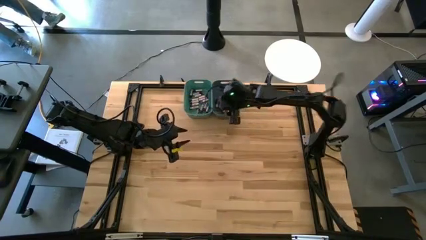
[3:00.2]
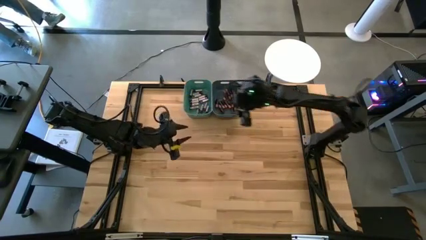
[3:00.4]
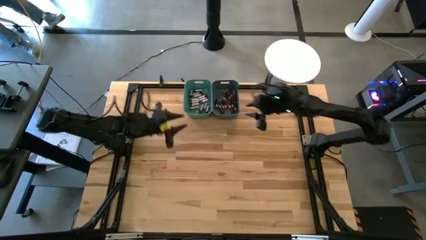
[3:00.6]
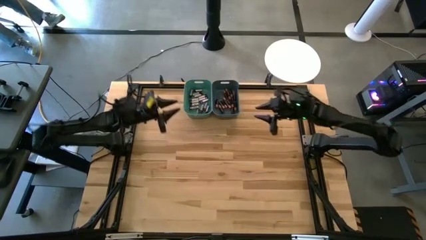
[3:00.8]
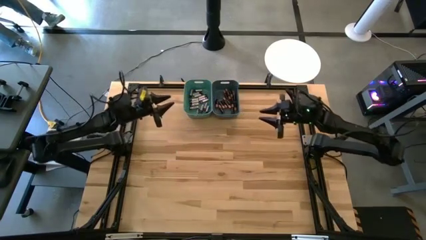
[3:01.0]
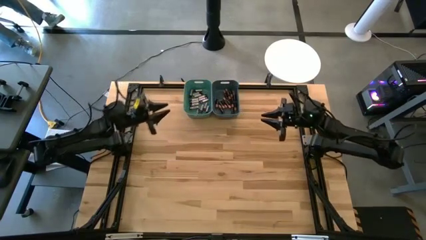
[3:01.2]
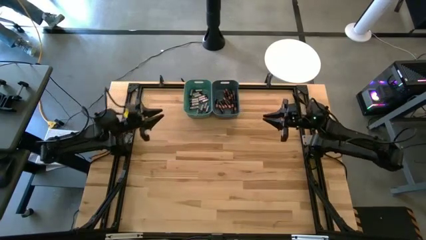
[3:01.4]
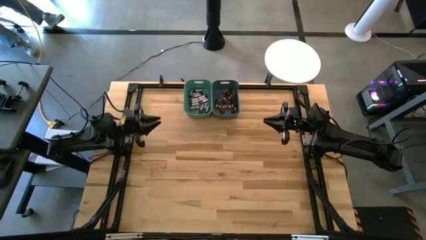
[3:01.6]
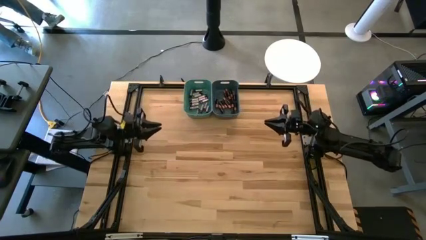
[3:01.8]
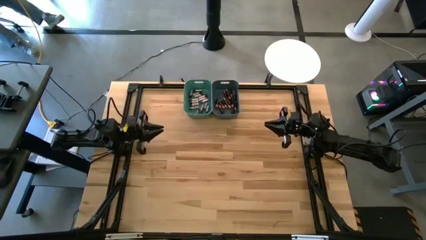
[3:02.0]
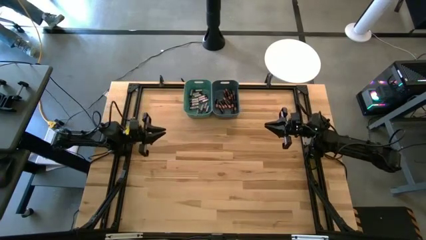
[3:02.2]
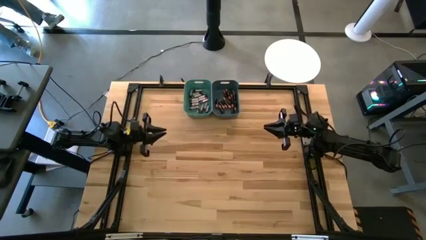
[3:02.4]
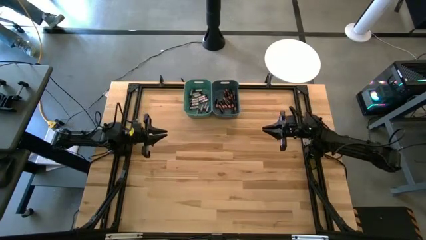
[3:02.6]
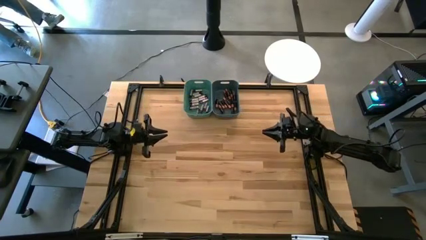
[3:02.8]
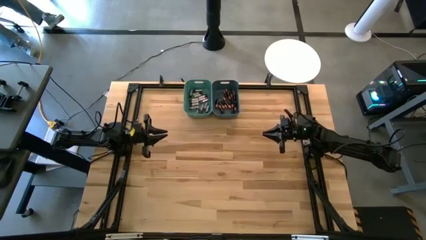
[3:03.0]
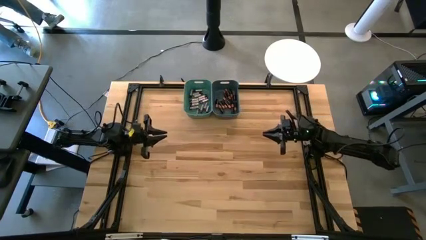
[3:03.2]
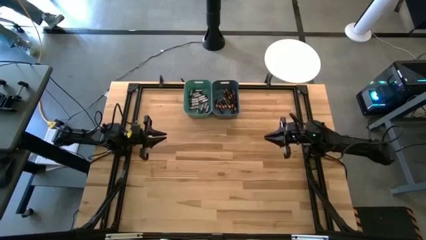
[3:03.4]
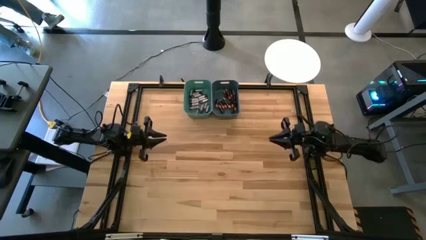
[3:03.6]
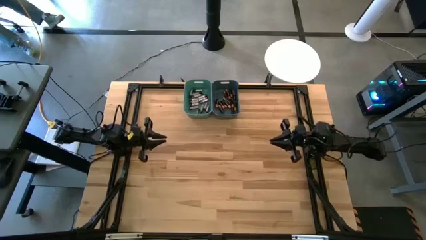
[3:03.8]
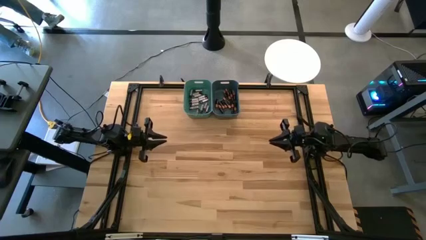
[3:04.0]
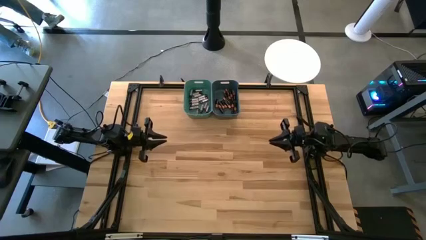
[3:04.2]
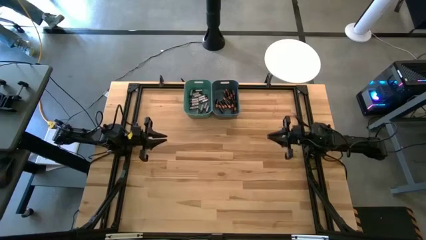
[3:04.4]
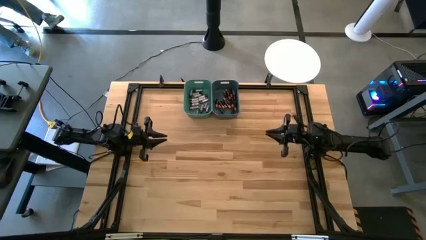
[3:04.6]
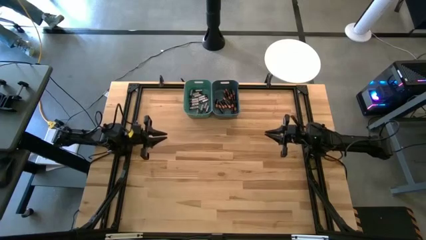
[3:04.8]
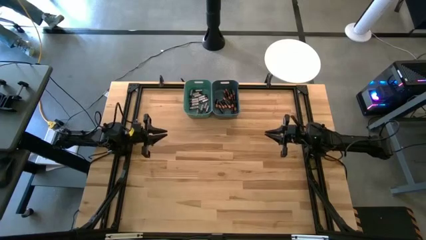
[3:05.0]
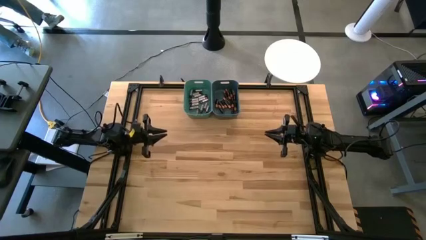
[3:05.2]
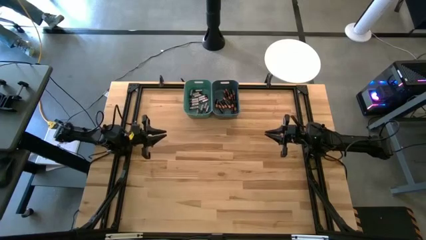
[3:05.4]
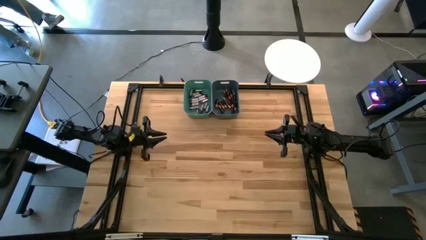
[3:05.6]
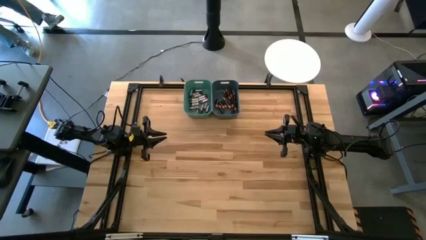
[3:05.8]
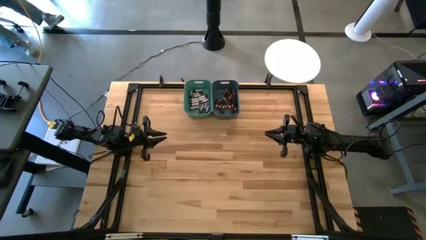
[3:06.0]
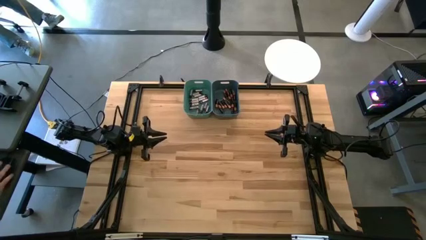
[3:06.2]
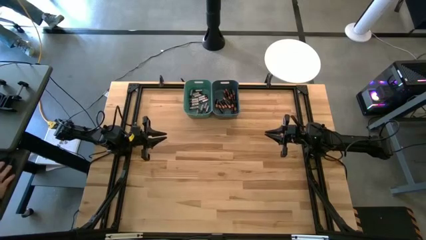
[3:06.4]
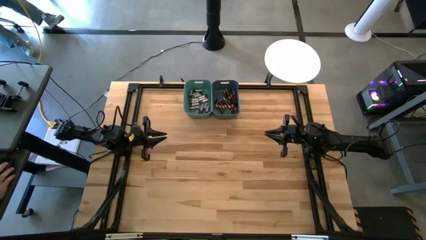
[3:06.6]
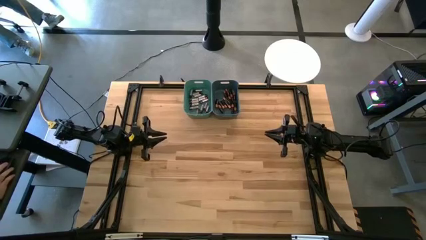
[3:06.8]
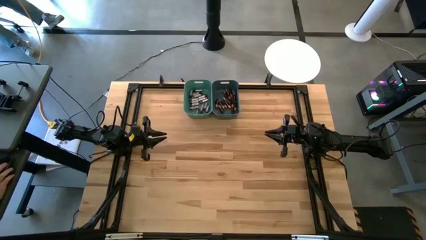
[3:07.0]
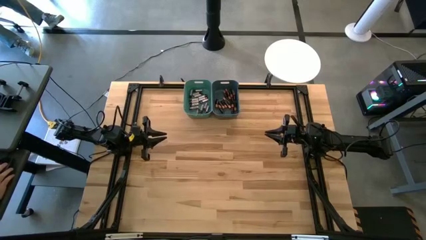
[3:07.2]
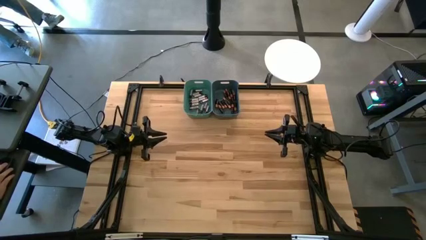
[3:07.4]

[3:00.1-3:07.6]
Task: Sort batteries
Return to Home Position
